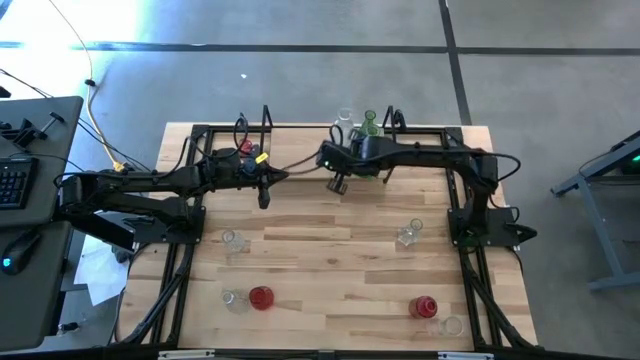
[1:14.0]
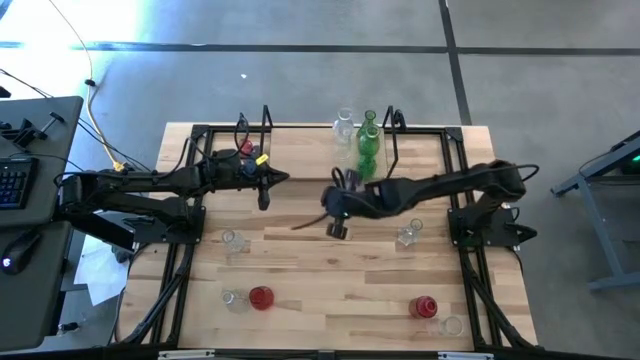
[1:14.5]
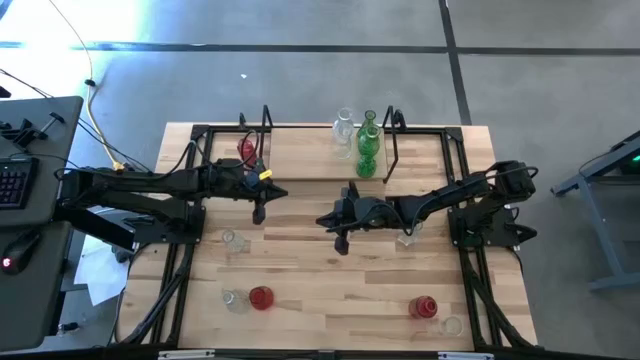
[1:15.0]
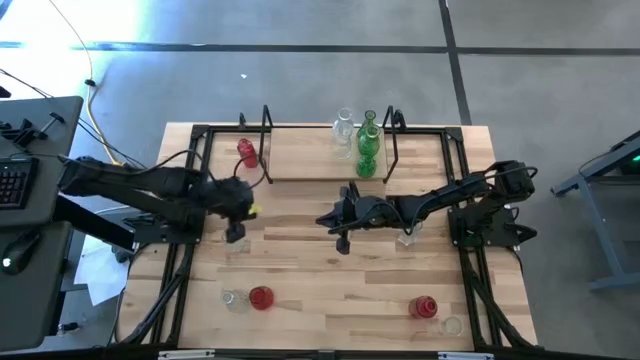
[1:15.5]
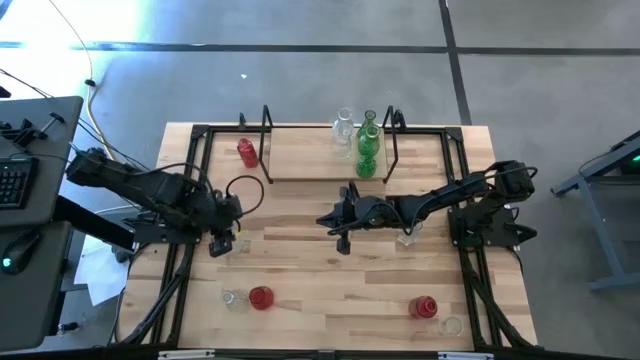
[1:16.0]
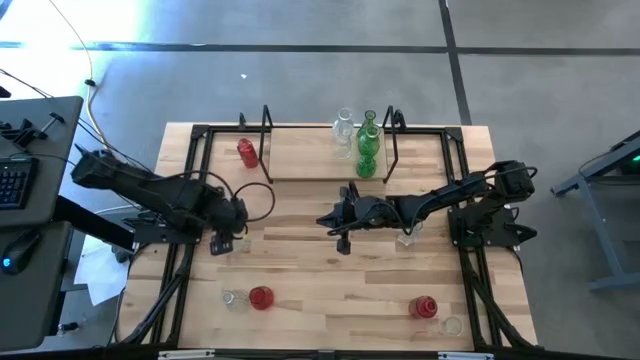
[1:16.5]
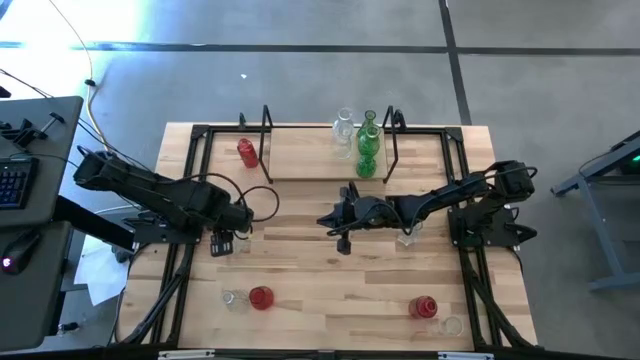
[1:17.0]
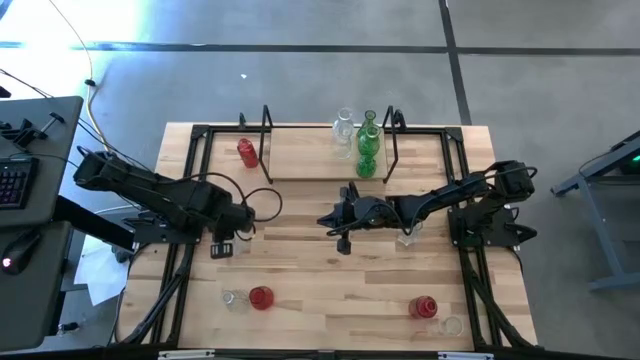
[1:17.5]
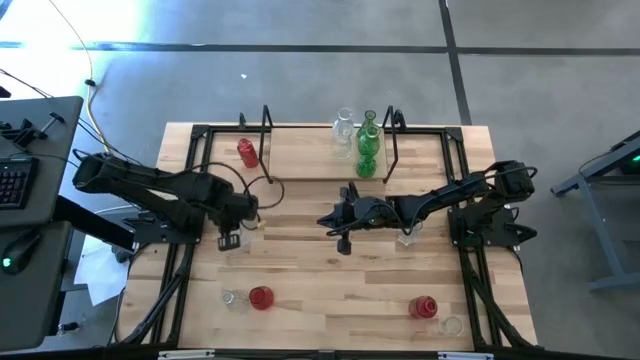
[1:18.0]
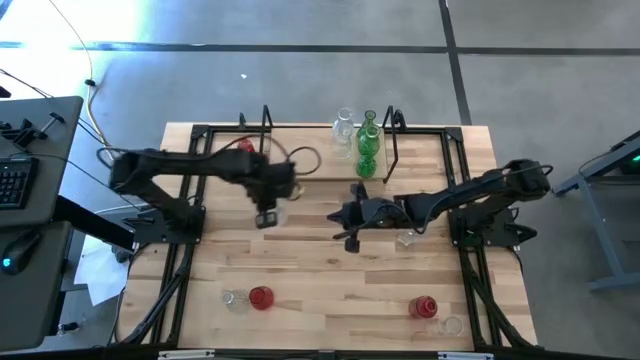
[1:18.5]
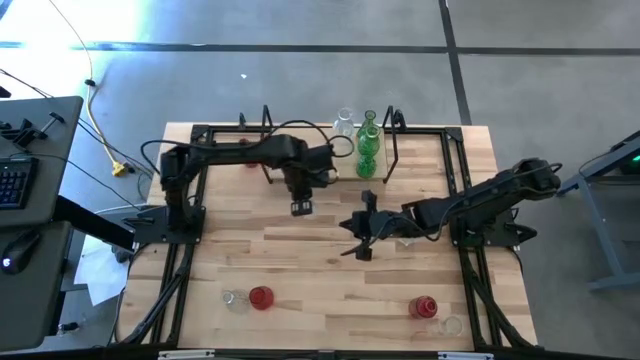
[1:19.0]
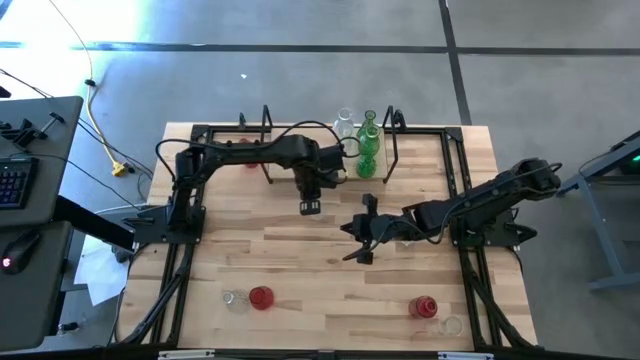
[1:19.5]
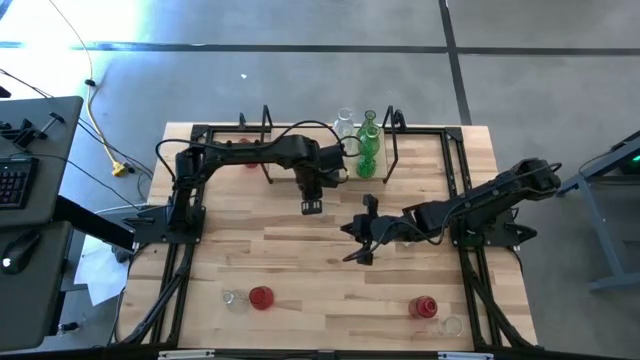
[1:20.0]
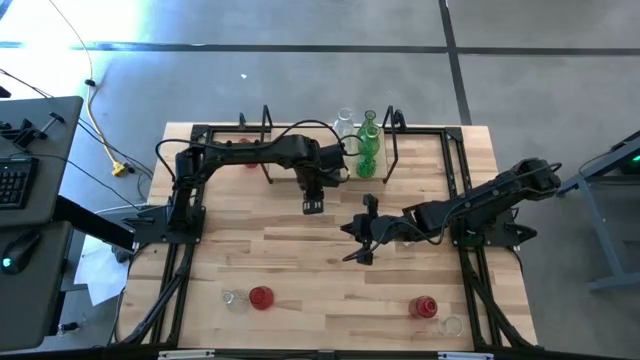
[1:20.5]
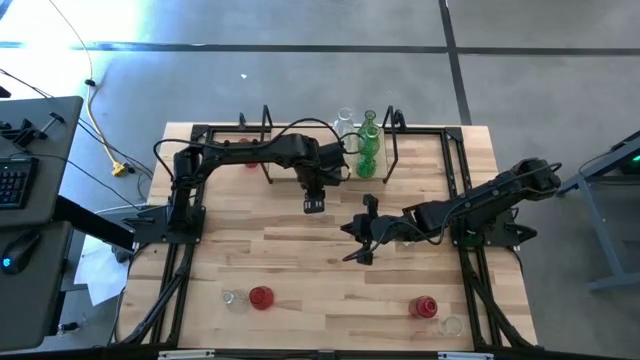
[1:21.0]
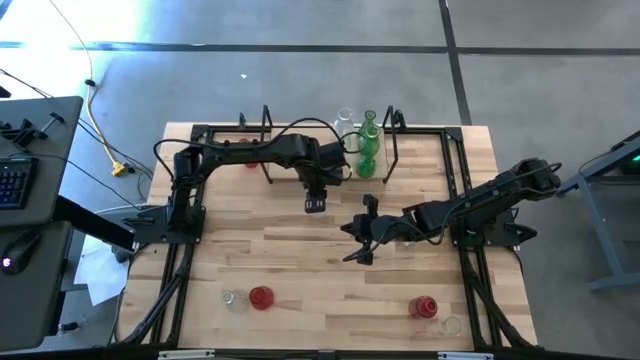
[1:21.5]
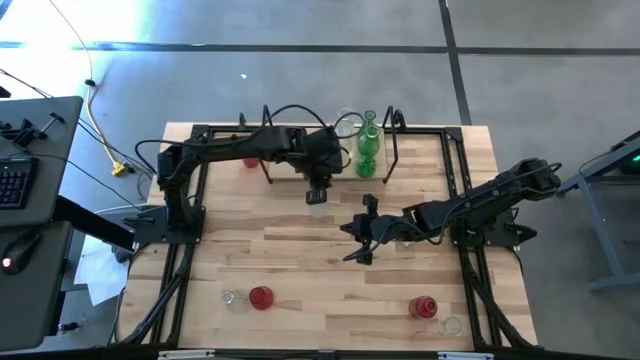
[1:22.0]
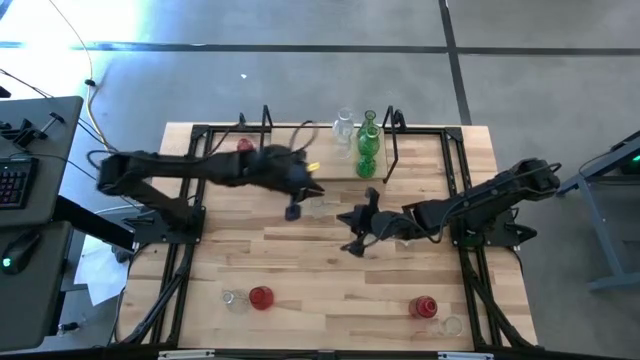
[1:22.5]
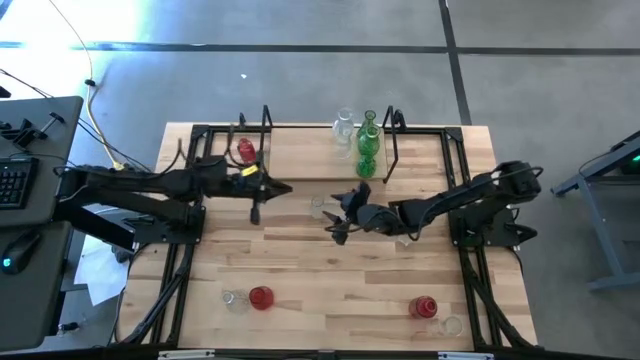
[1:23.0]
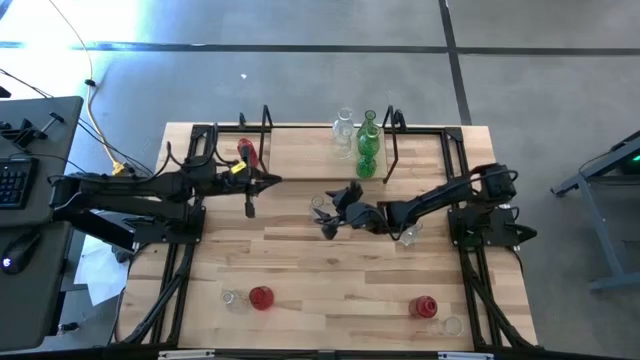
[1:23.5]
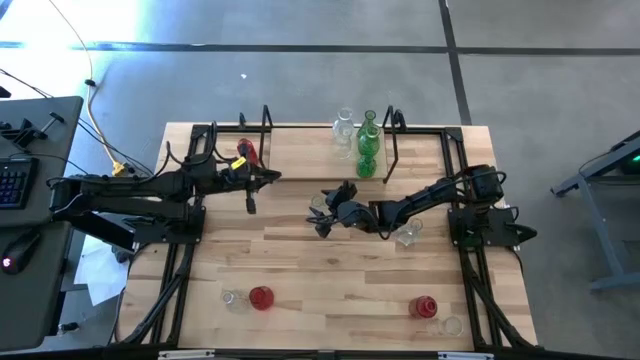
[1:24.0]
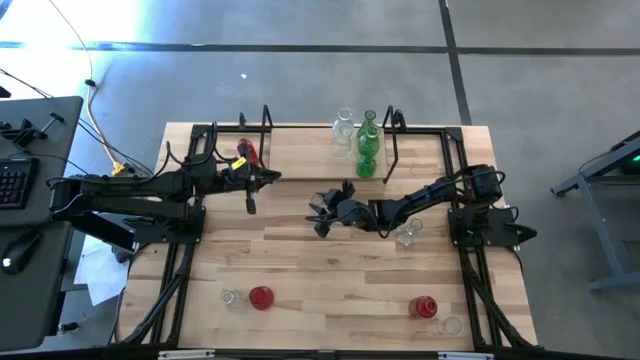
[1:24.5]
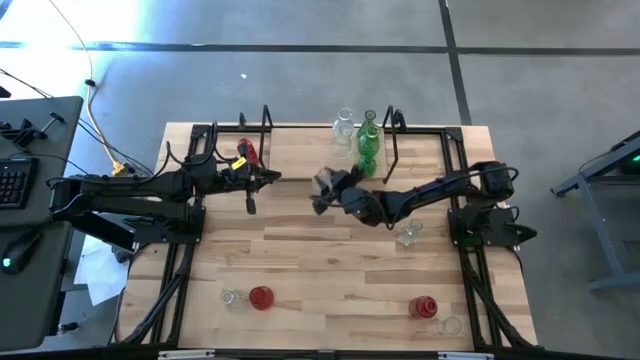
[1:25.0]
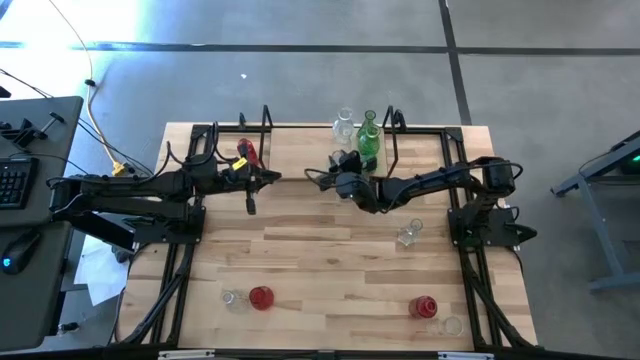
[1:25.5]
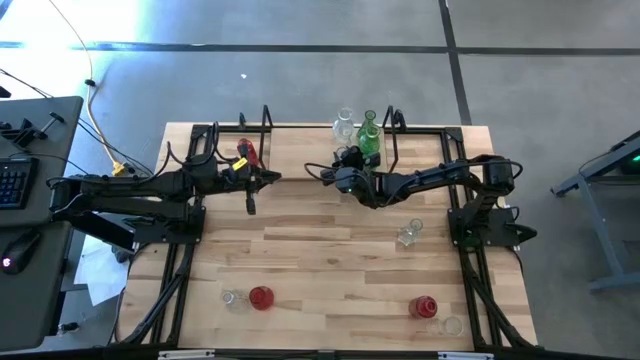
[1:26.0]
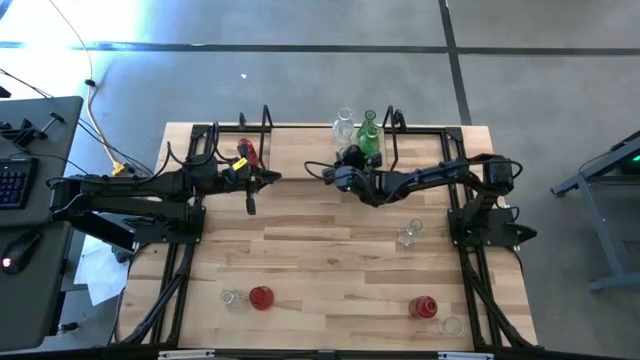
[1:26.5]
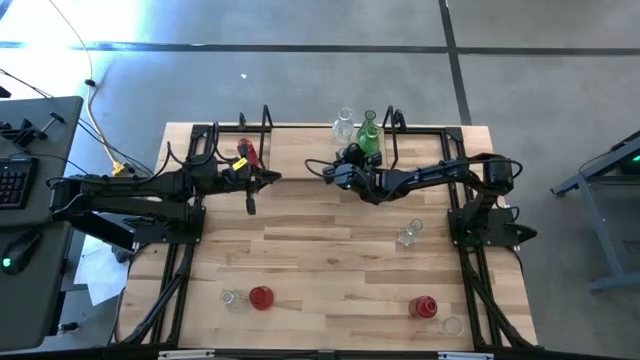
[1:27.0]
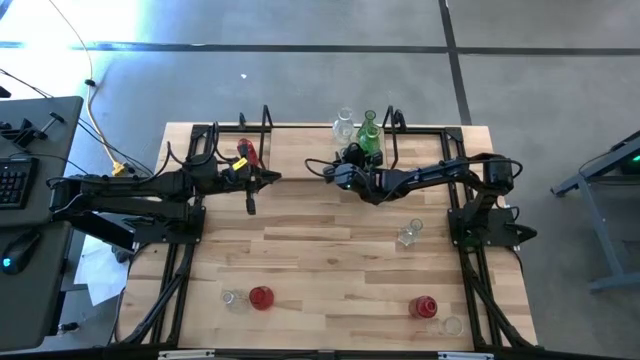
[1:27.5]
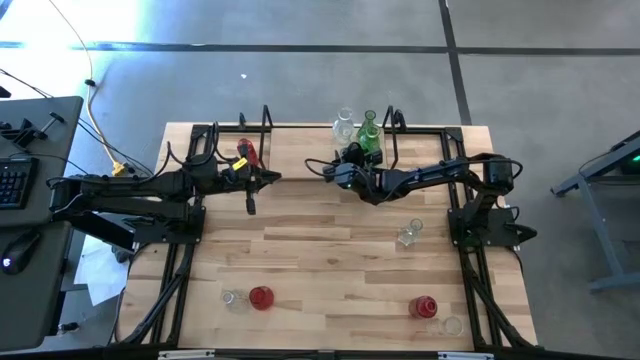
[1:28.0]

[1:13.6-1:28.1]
Task: sort vases onto shelf
Put the top left transparent vase aligned with the other transparent vases on the shelf

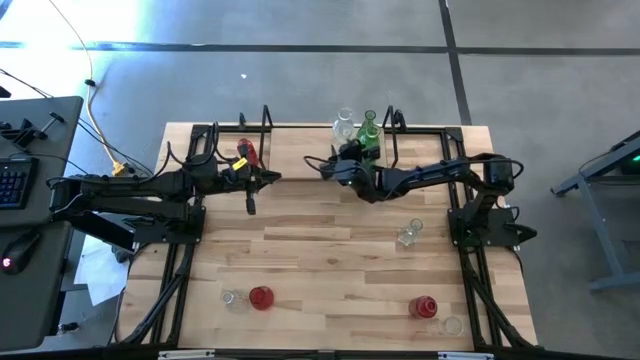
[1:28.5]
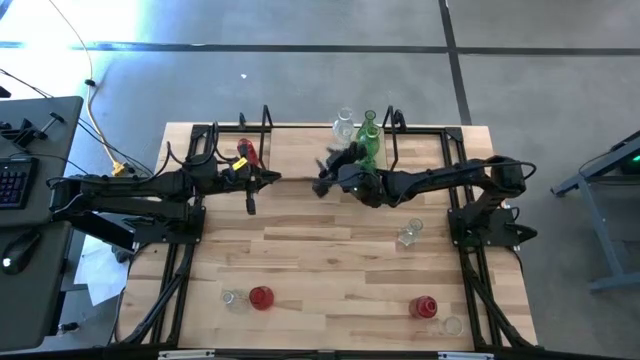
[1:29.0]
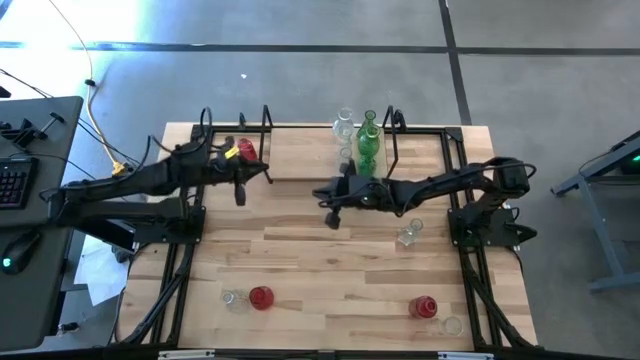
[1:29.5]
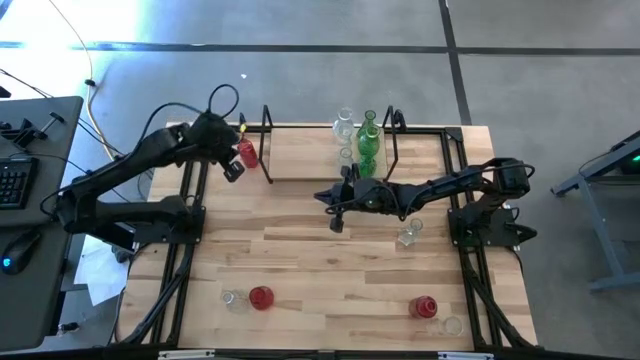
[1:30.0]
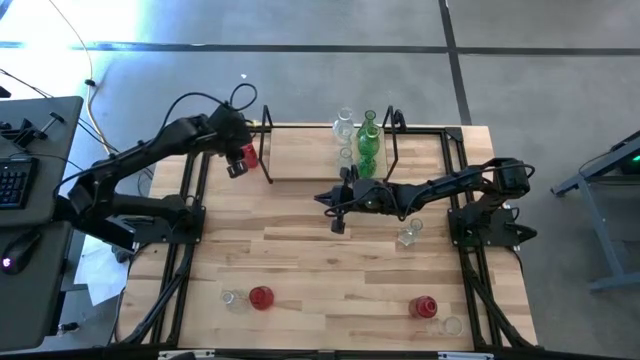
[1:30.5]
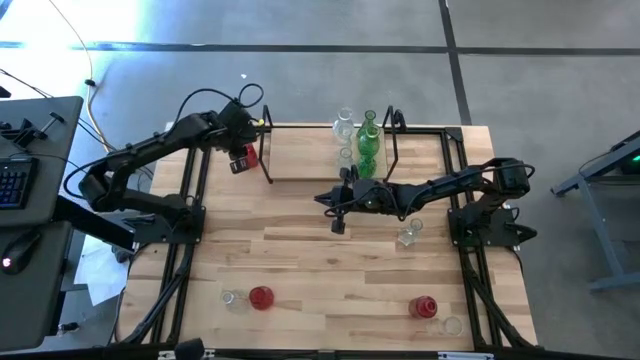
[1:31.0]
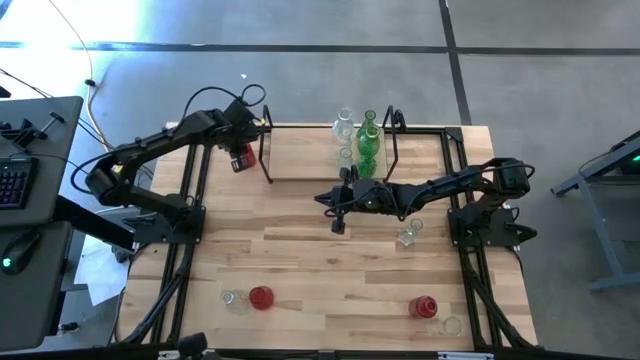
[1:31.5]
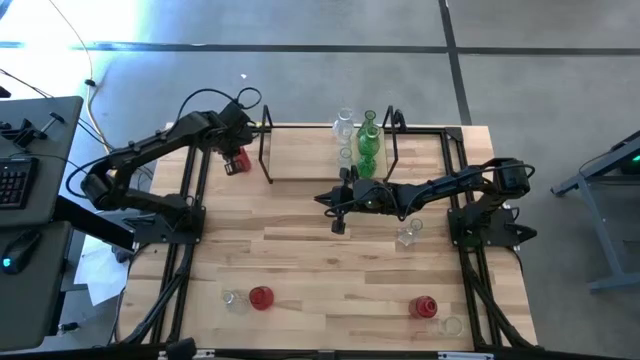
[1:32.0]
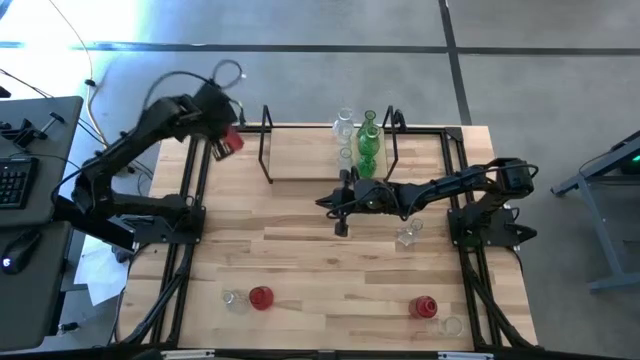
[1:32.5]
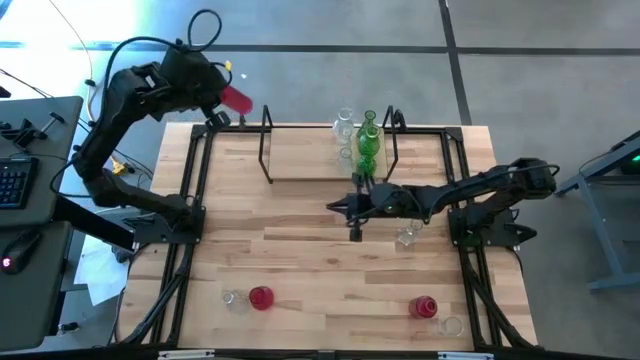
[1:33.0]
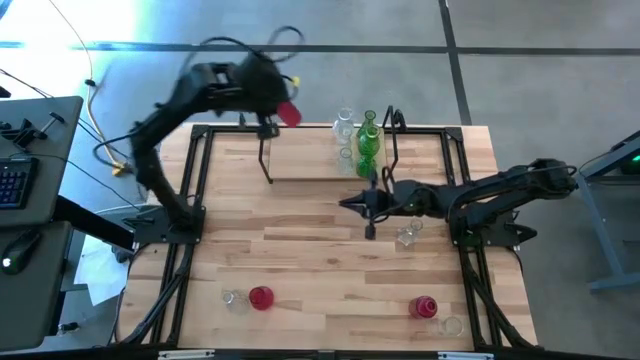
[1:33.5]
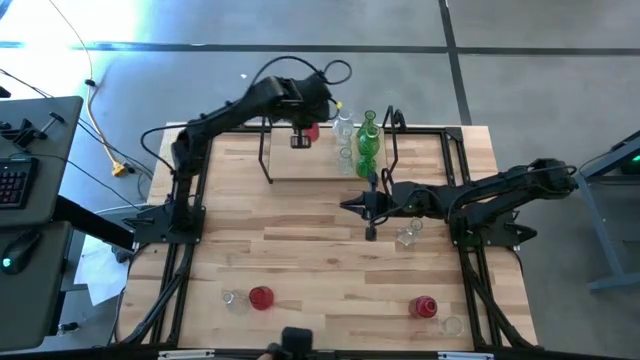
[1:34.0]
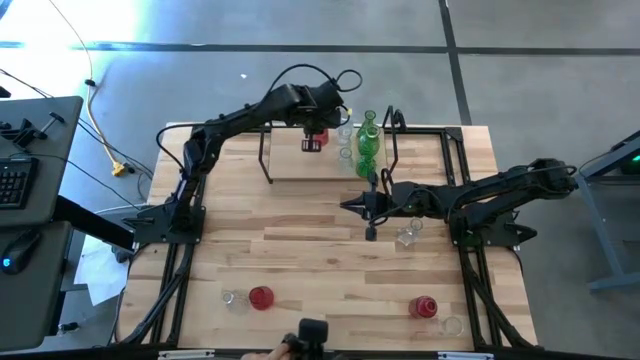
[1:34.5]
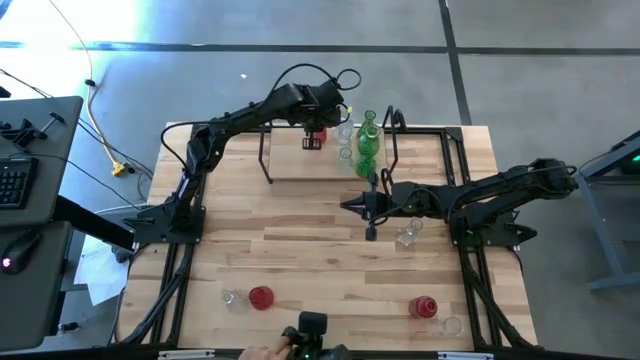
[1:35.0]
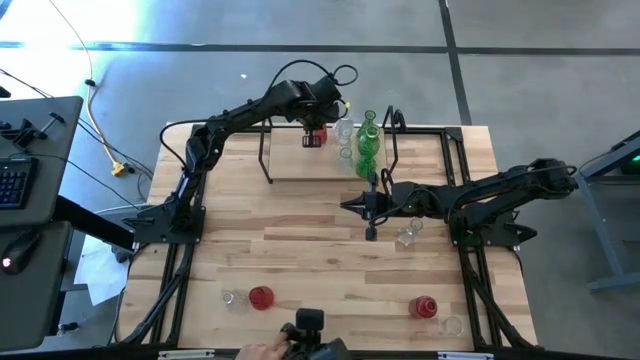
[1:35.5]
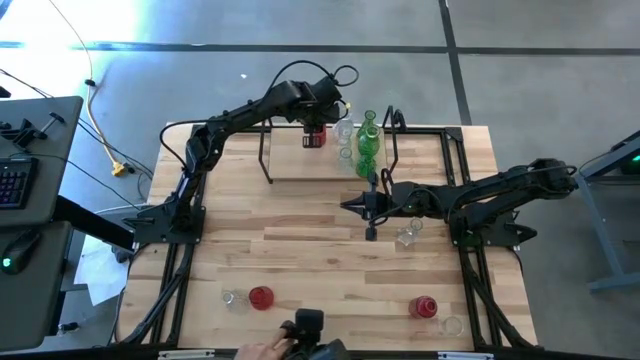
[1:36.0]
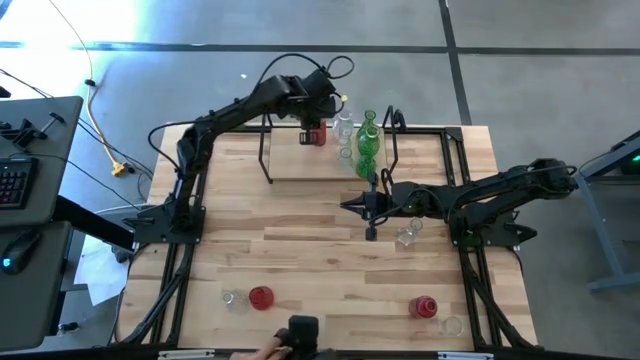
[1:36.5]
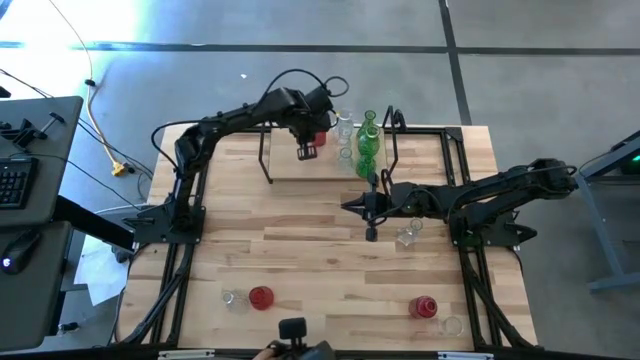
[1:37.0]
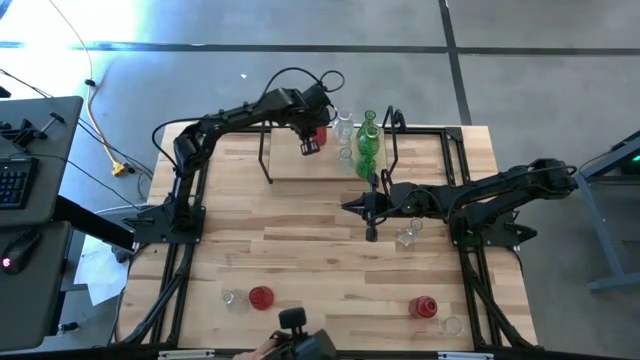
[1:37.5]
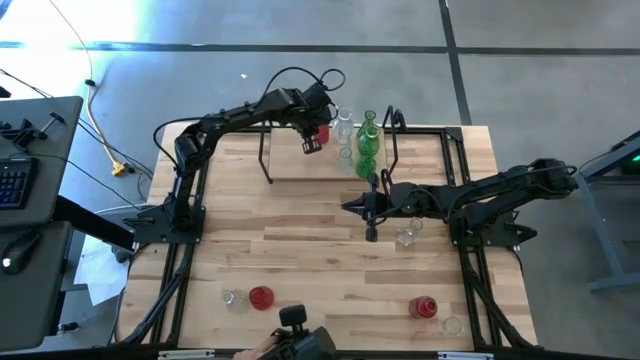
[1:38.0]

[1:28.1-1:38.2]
Put the top left red vase on the shelf
